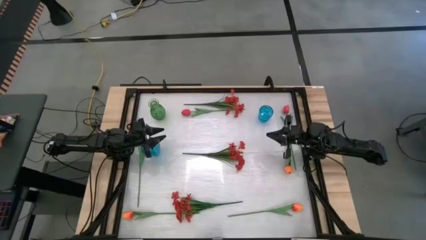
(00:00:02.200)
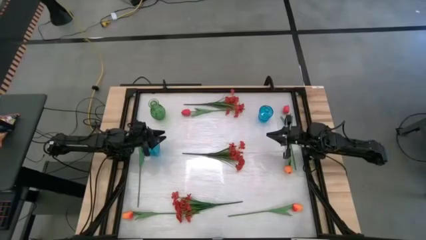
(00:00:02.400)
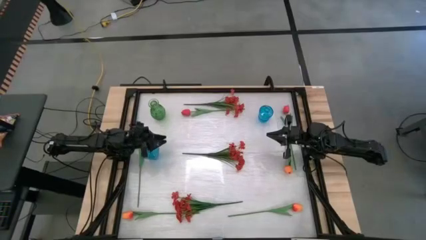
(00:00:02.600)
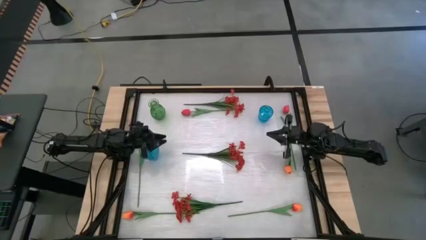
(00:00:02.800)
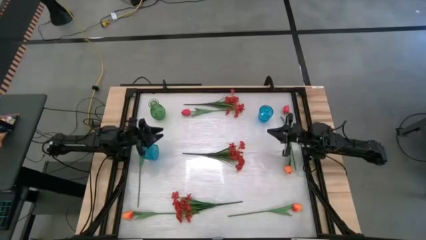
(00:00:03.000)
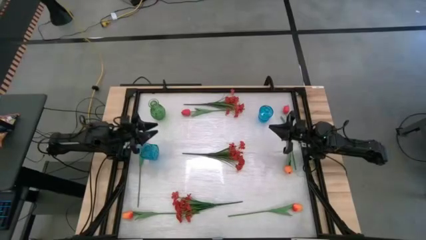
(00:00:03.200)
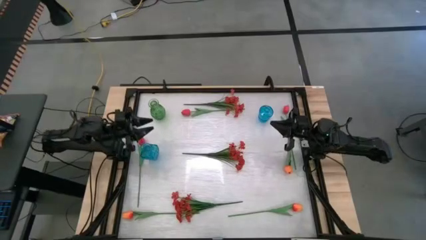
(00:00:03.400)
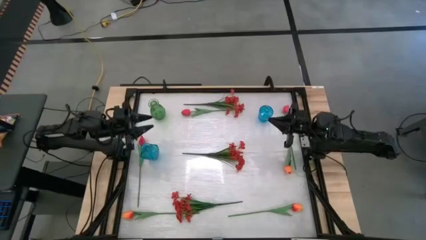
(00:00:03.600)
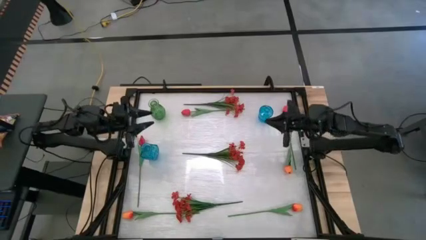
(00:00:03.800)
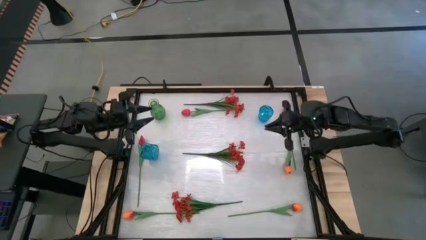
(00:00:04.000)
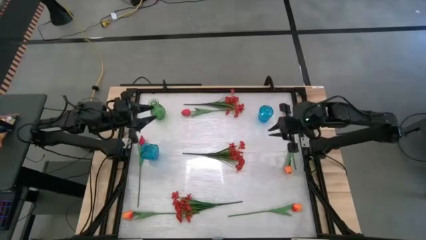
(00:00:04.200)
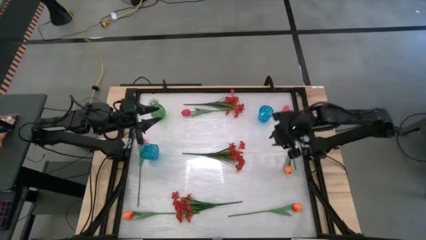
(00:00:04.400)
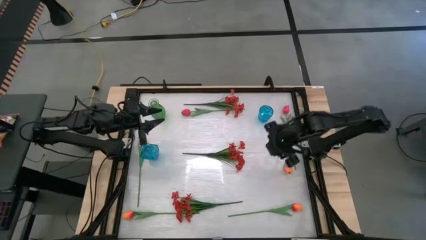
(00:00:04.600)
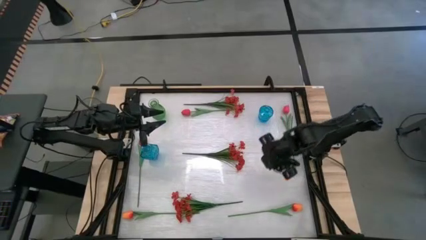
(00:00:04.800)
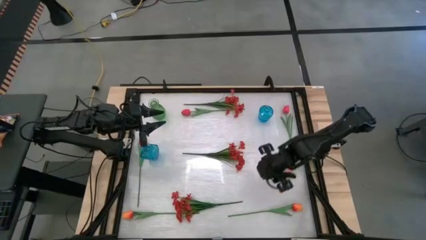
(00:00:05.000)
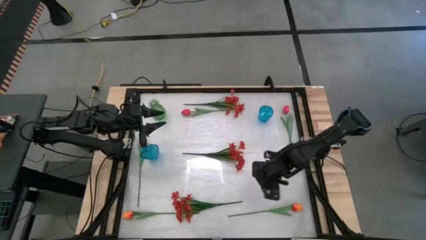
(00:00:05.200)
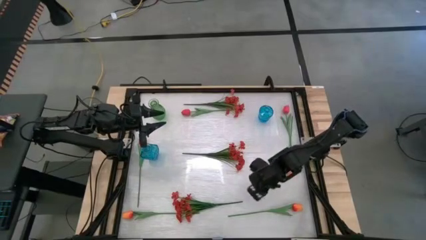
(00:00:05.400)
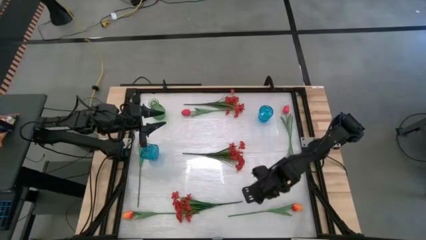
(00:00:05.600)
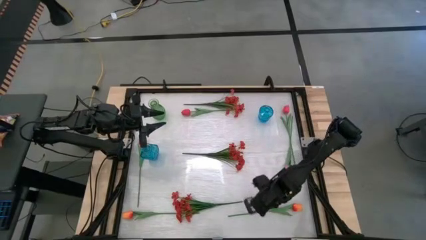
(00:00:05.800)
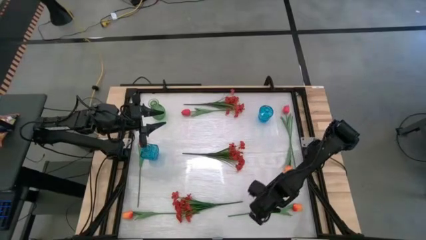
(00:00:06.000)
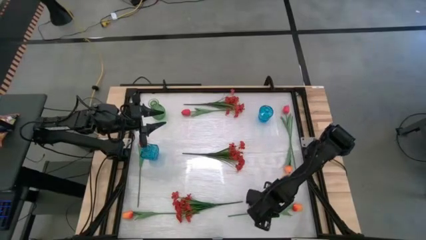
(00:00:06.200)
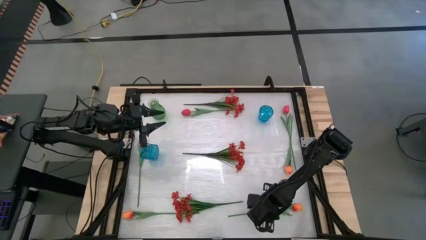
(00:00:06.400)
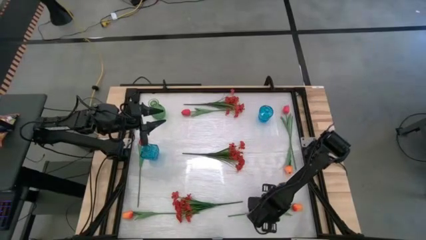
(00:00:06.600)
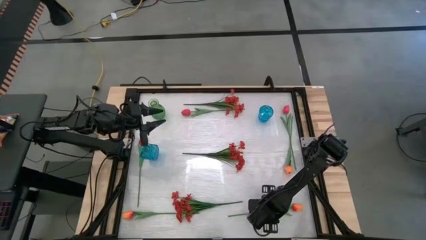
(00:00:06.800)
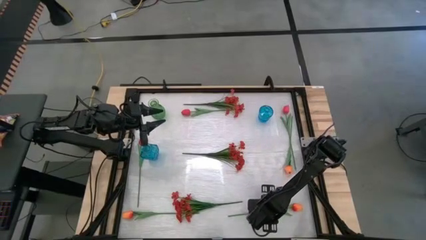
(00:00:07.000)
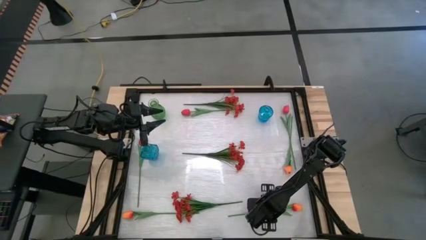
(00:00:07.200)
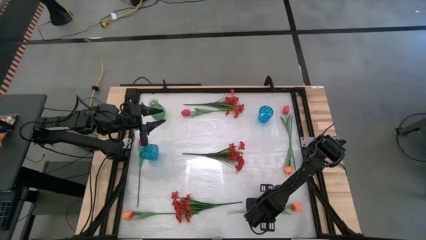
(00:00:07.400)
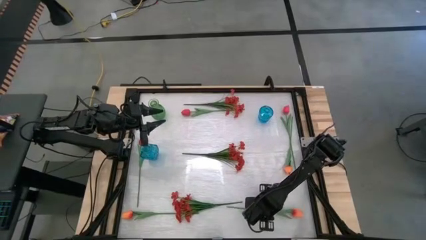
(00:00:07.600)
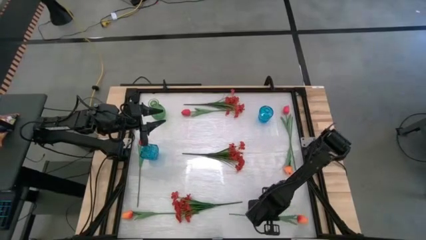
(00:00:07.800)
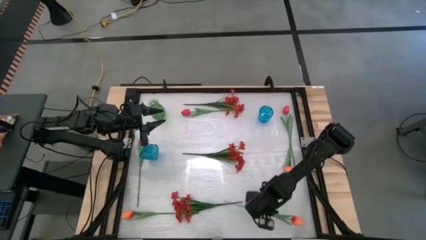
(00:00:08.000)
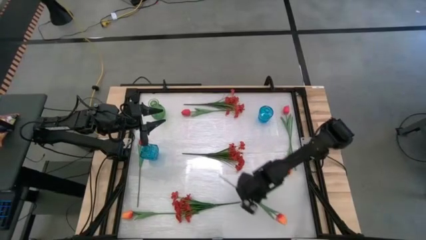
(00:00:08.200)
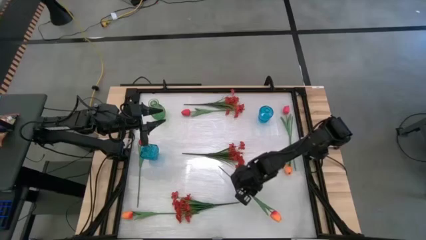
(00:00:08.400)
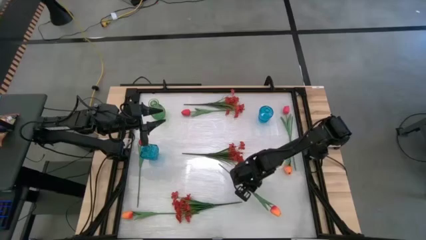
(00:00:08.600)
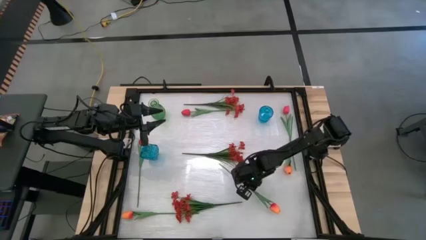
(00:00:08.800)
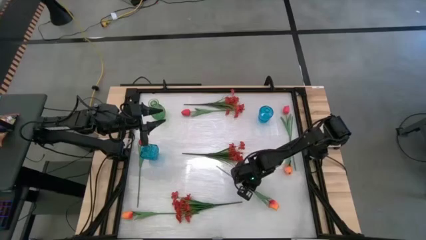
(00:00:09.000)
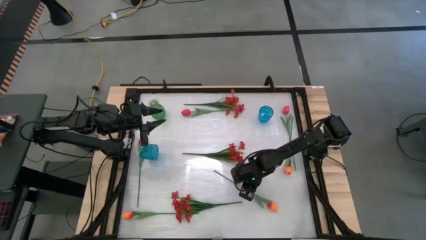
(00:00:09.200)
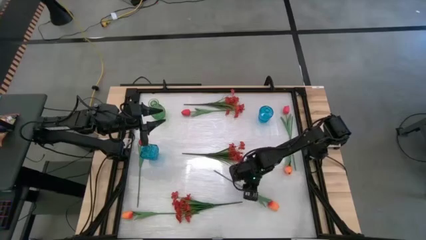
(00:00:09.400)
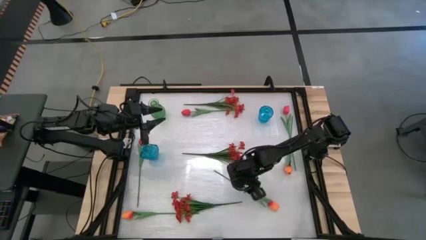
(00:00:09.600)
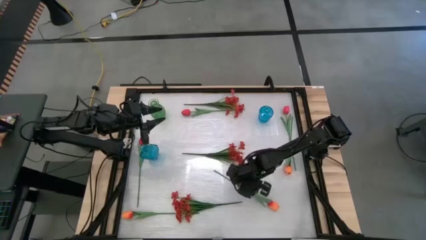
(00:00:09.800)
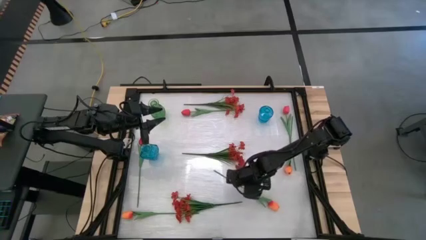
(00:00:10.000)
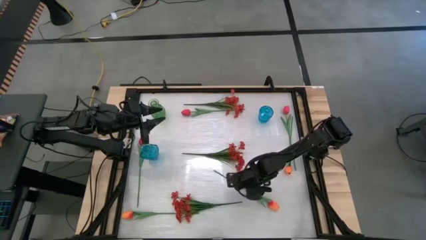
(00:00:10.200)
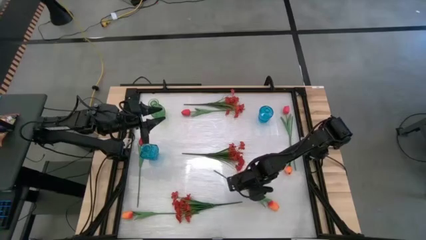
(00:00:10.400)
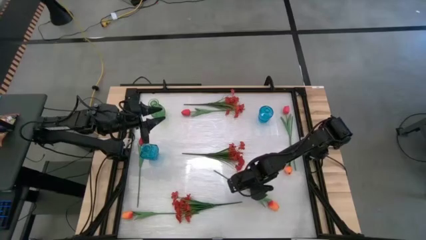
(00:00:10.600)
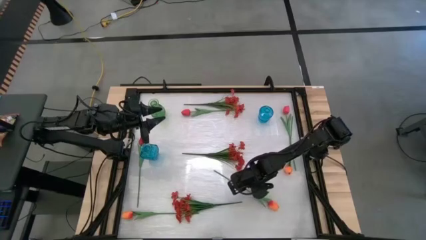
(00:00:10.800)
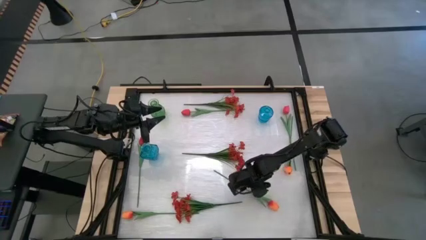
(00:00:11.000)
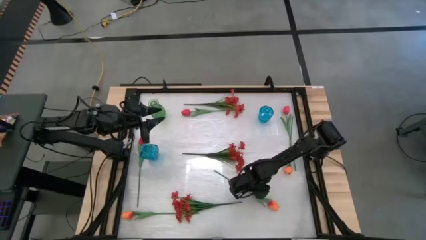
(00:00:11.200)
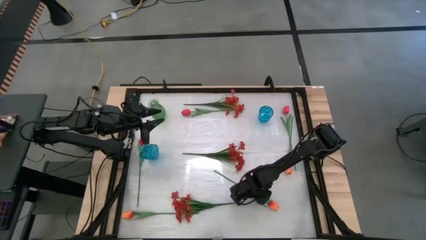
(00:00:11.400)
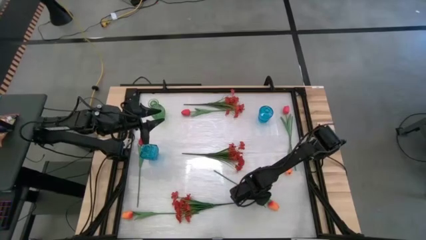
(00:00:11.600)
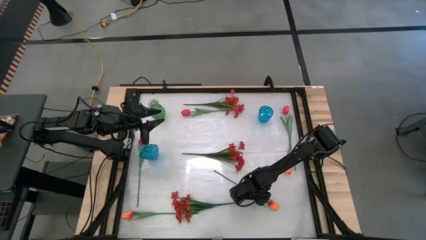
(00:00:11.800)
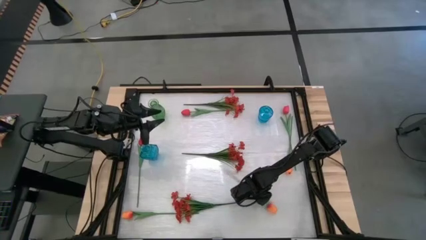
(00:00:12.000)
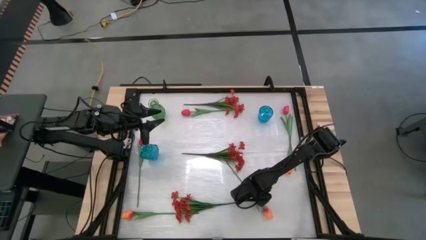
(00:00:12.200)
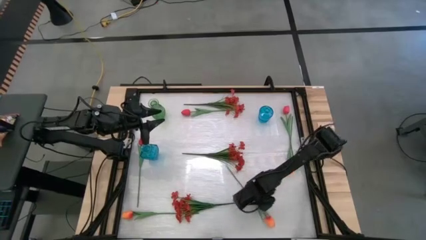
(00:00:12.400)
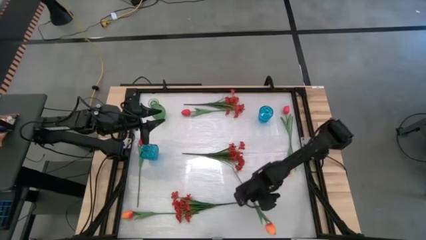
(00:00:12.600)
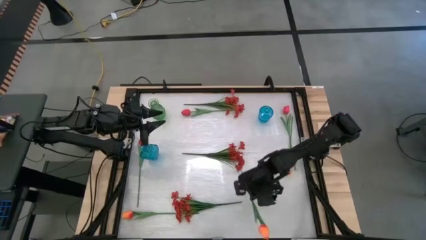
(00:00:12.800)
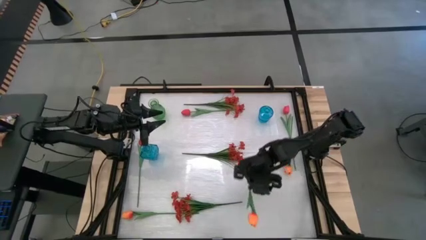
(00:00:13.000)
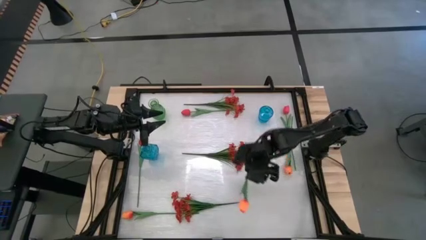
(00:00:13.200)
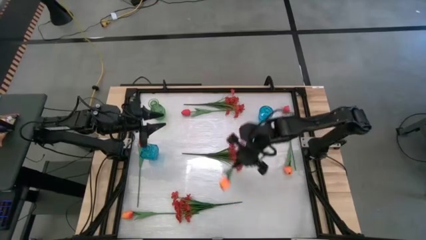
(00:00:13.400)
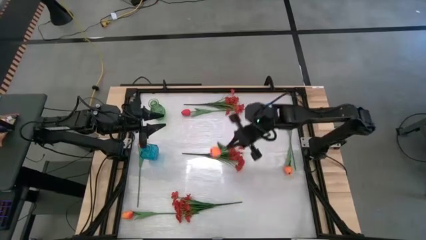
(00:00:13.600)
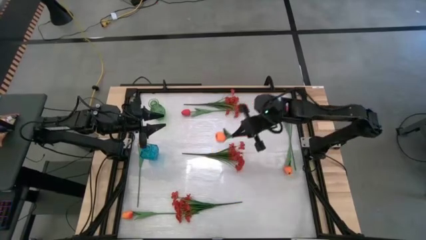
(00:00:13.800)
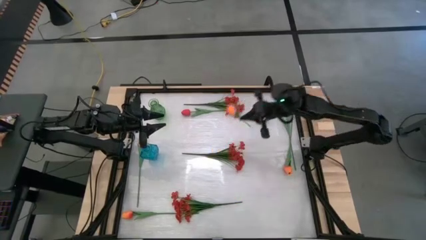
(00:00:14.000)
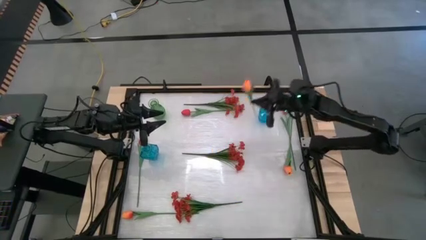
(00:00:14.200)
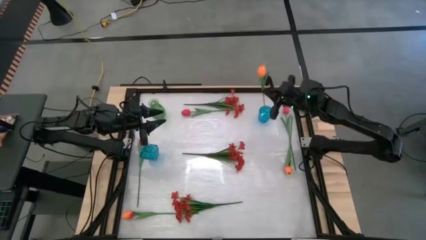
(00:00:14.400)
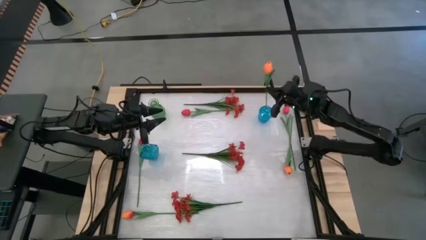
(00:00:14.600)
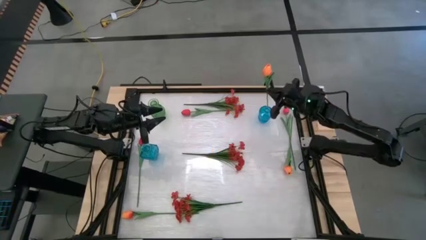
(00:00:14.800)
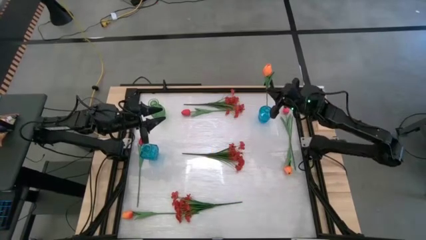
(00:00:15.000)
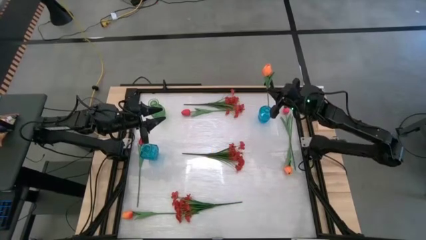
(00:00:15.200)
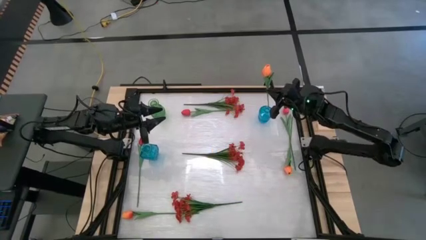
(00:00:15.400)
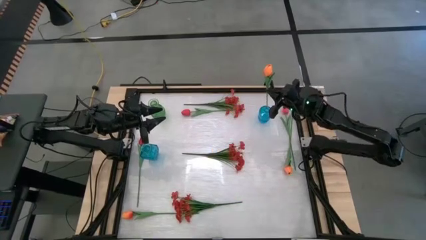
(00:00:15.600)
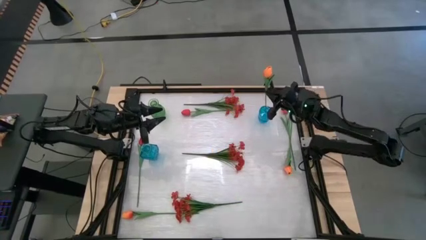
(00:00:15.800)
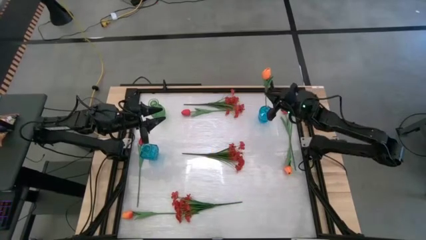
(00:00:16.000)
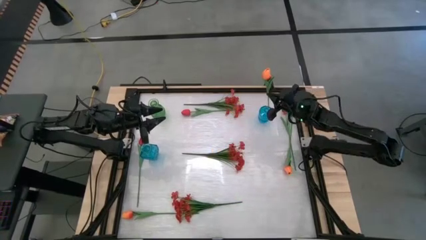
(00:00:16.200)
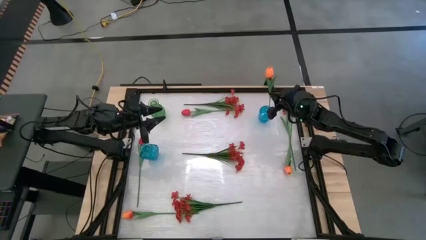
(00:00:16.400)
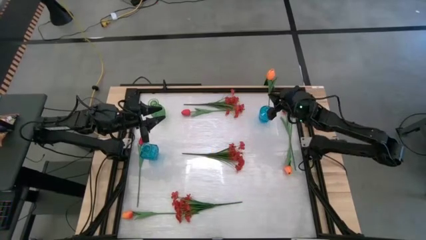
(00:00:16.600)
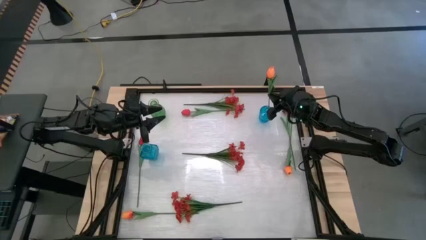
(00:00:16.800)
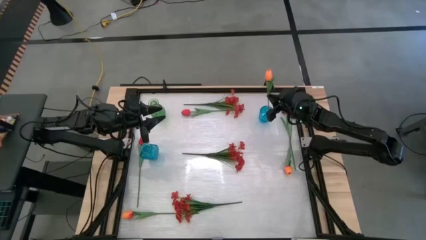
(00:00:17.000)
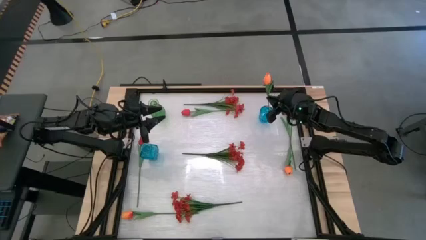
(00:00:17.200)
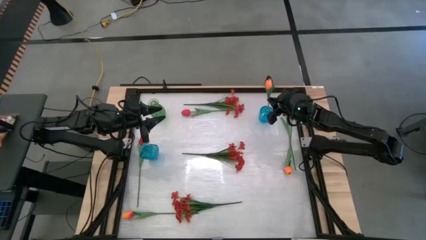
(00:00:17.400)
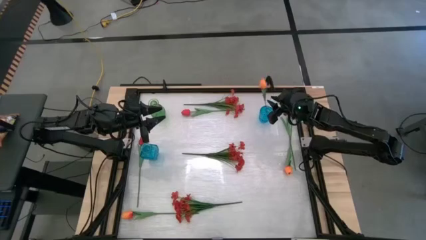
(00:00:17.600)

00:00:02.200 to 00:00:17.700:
Task: Sort flowers into vase by color
Put the bottom right orange tulip into the right blue vase
